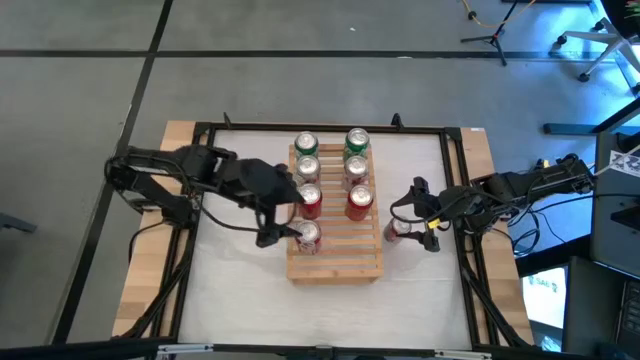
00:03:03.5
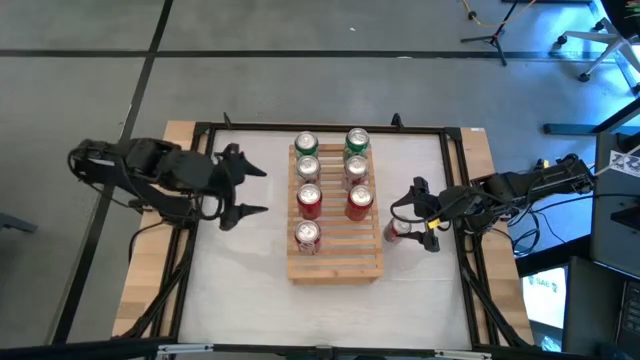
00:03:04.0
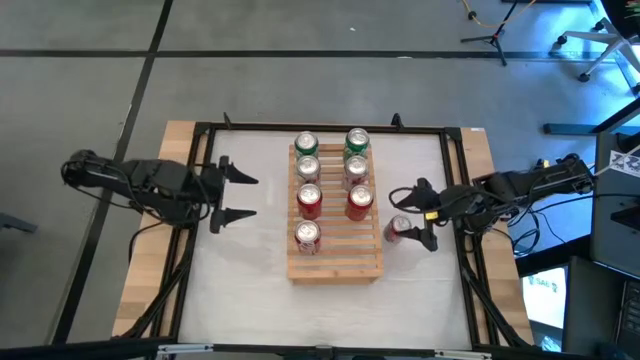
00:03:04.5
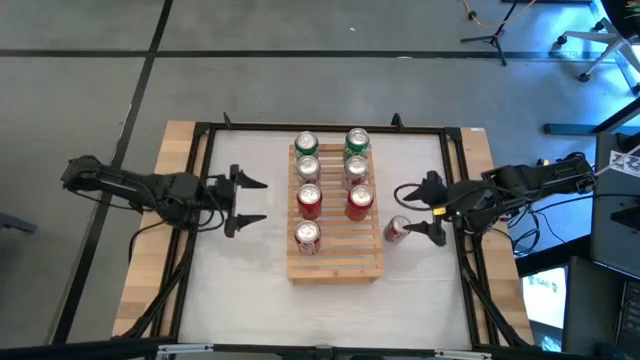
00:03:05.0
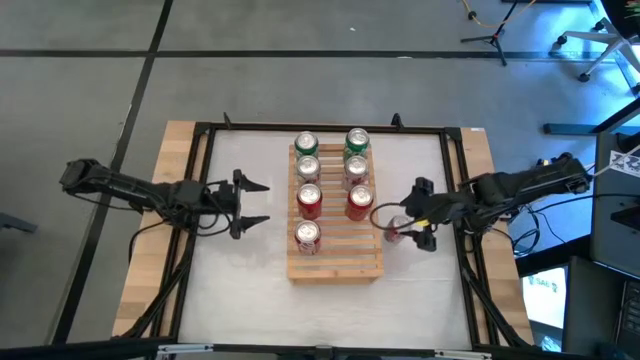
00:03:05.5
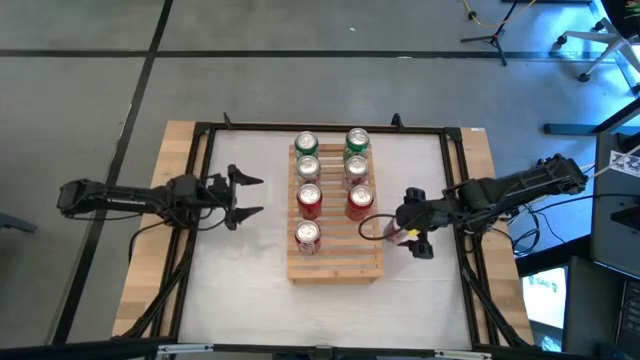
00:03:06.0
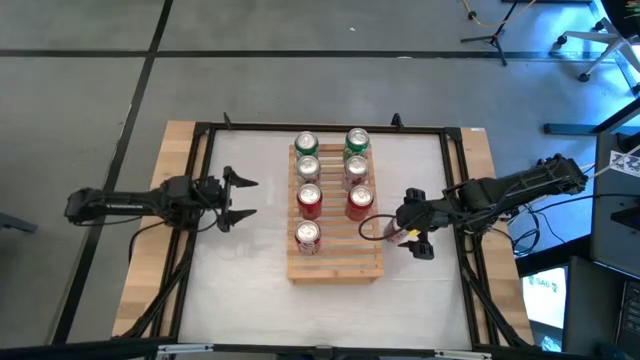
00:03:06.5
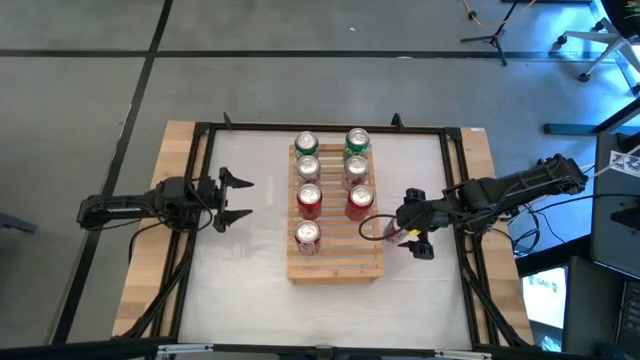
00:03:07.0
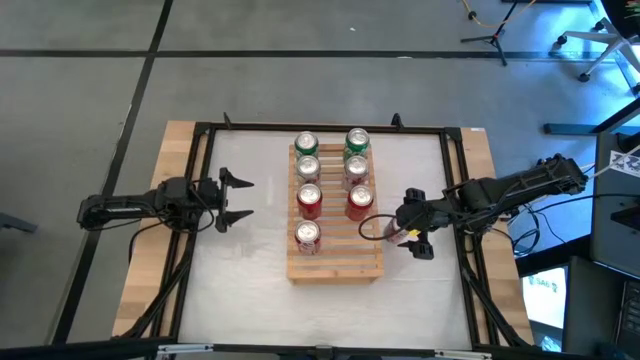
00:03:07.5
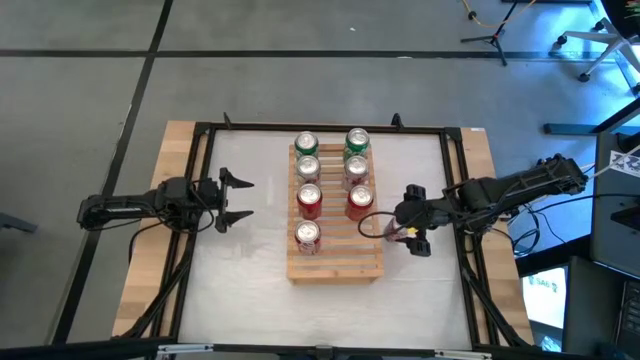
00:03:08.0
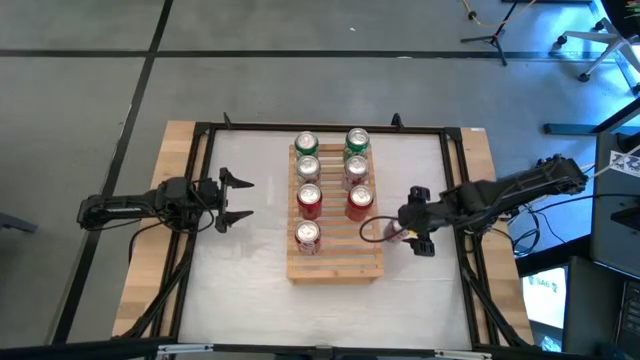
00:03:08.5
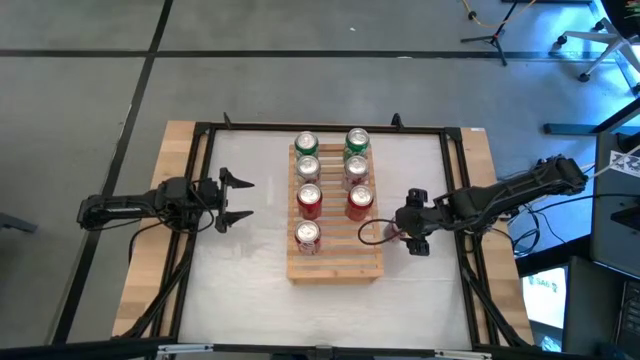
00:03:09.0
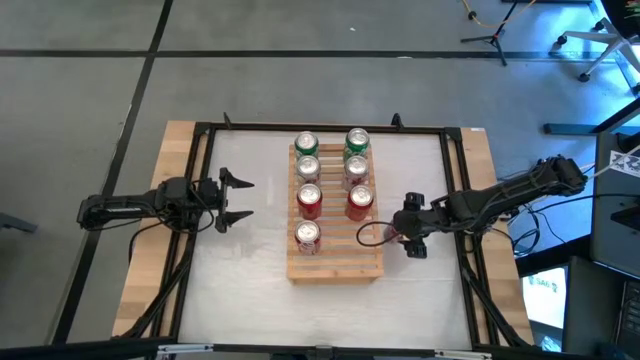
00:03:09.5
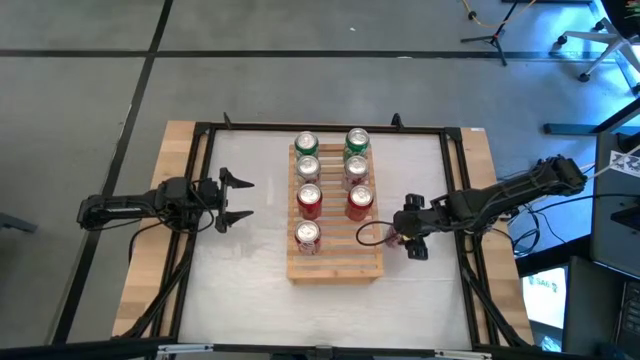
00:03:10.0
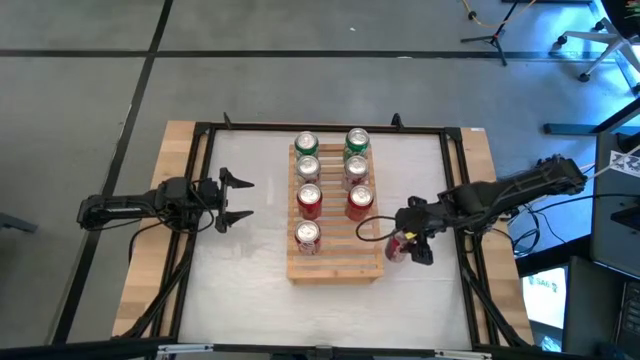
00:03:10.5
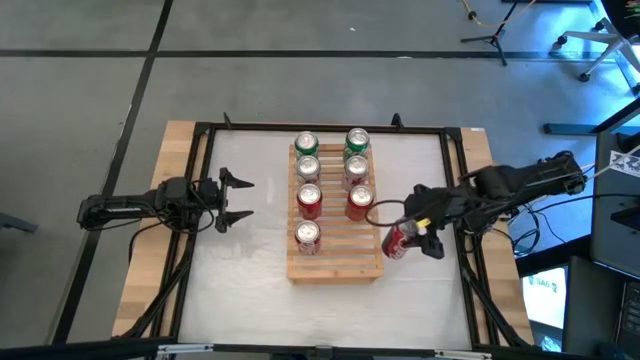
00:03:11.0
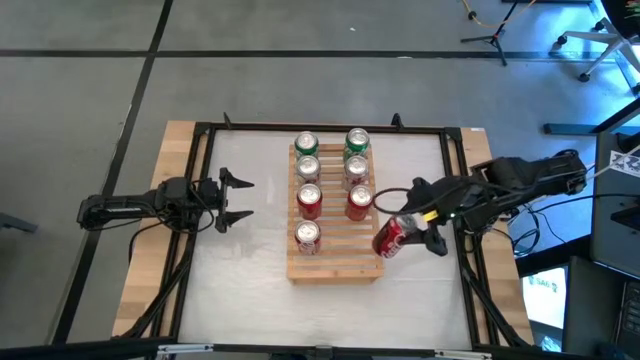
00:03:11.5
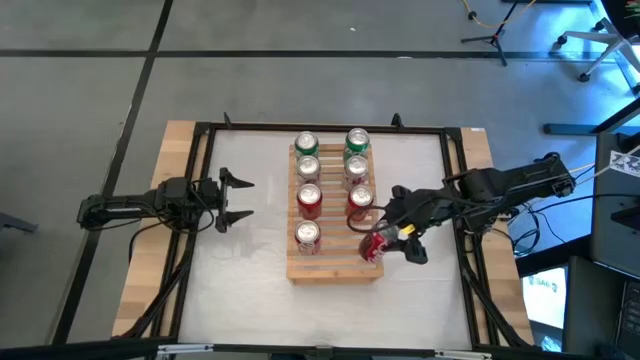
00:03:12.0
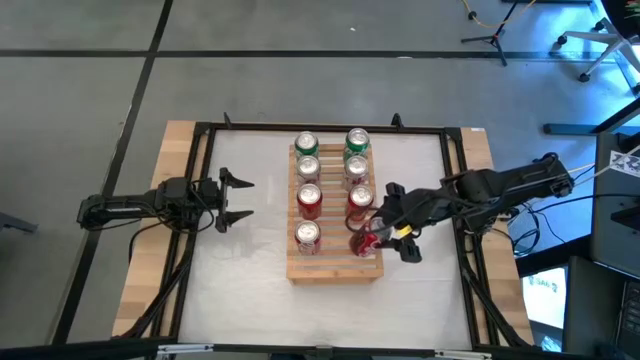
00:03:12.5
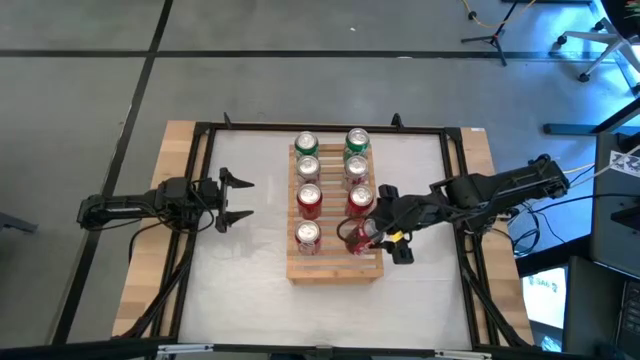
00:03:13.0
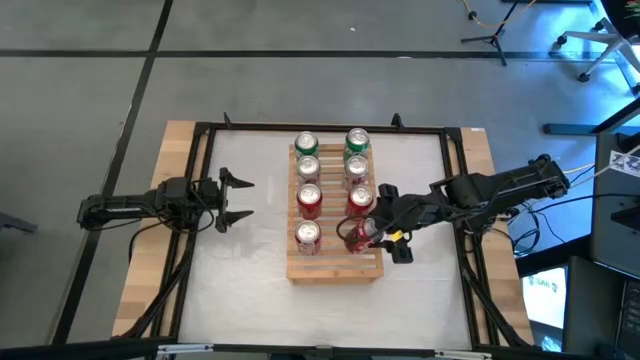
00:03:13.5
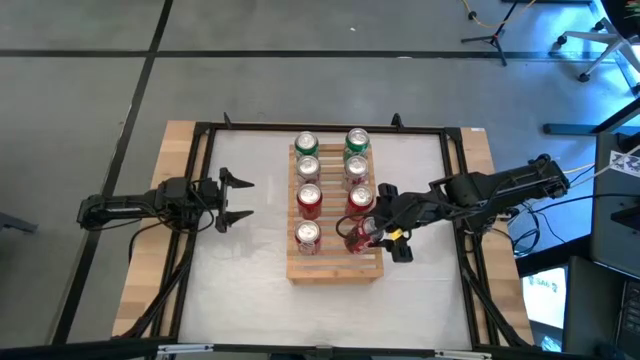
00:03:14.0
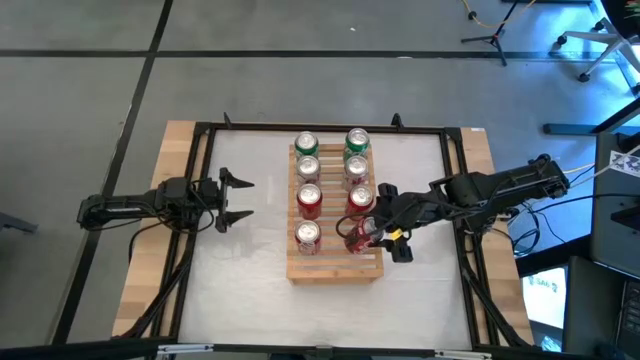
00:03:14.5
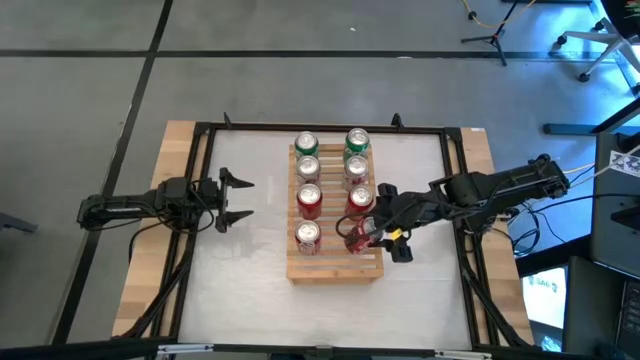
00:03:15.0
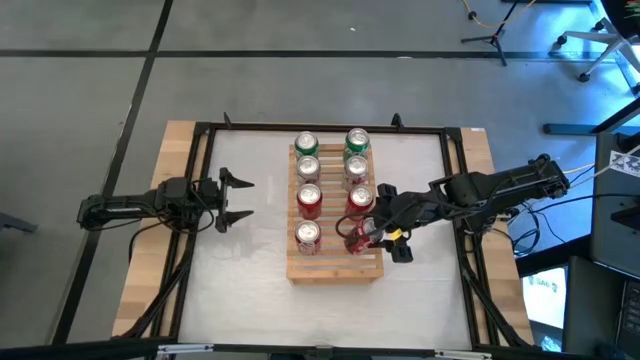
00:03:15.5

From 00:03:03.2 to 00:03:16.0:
Task: Place canned beverage on shelf
Put the white and red soda can on the shelf aligned with the white and red soda can

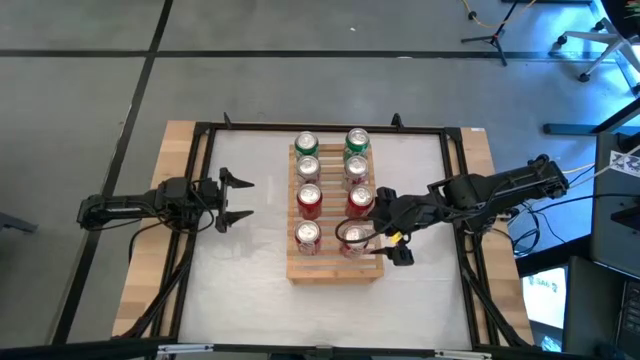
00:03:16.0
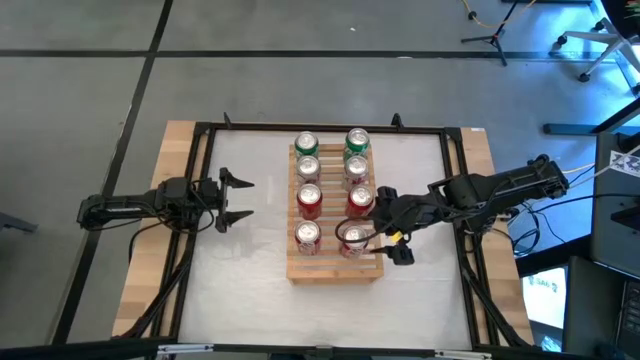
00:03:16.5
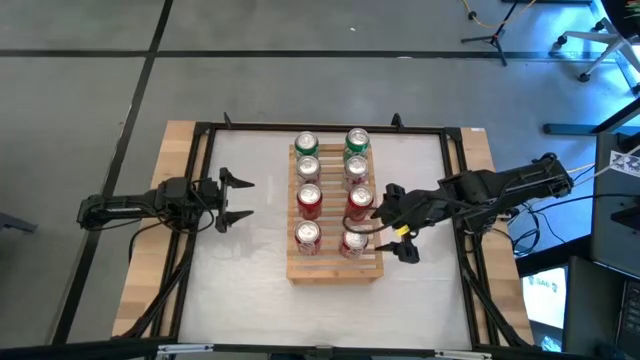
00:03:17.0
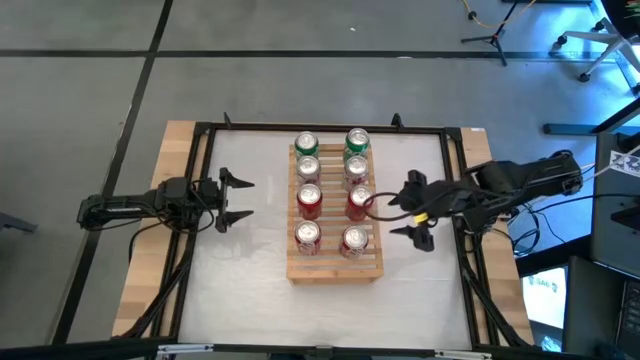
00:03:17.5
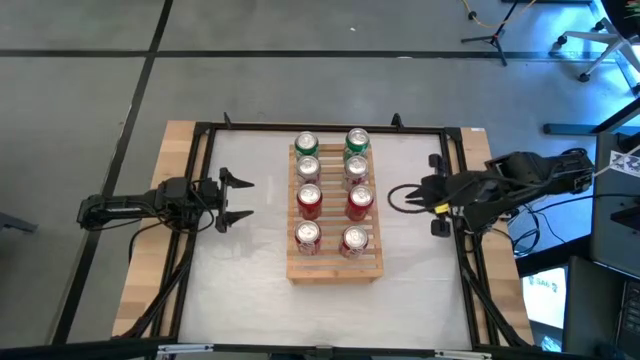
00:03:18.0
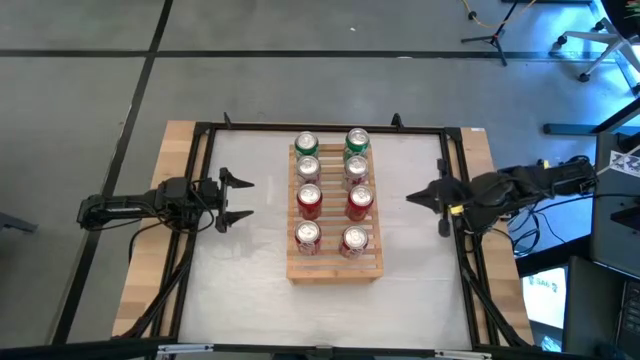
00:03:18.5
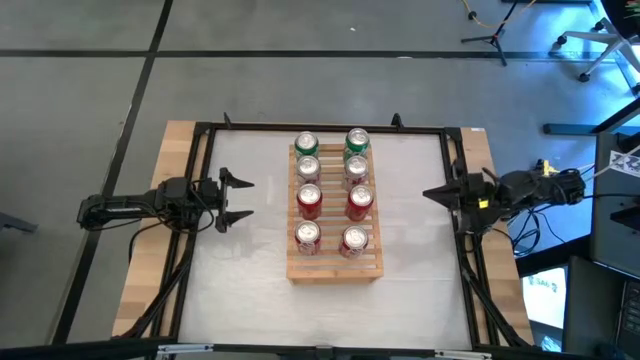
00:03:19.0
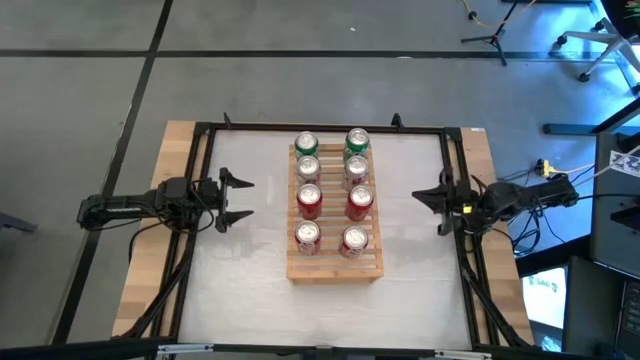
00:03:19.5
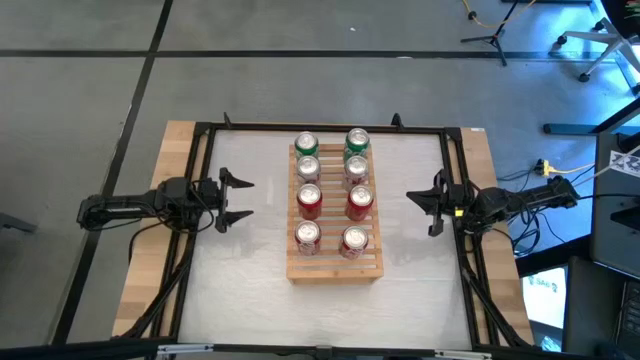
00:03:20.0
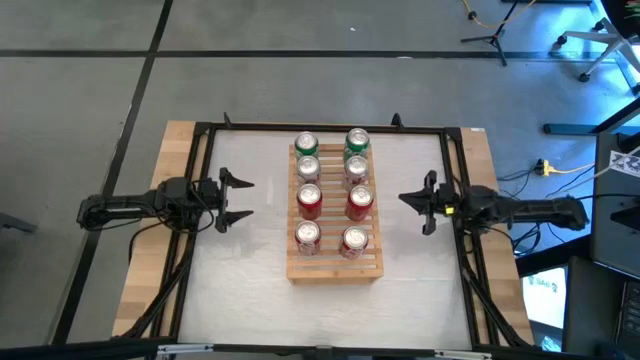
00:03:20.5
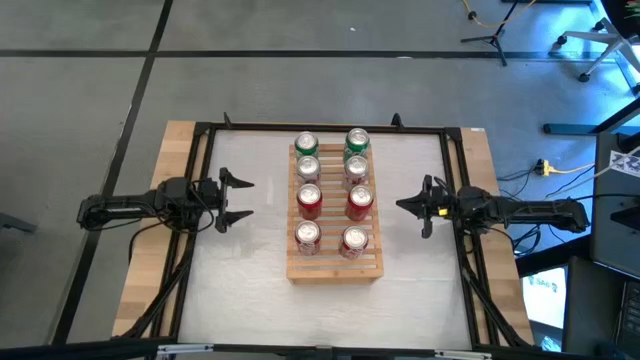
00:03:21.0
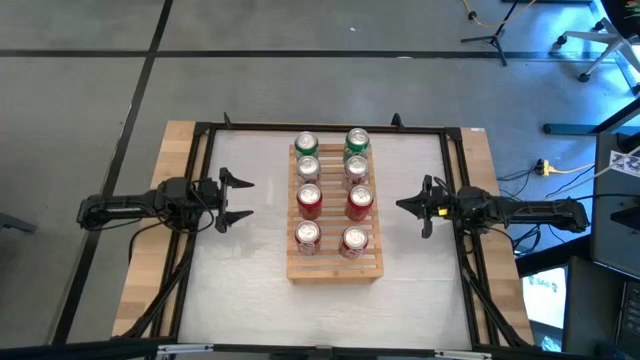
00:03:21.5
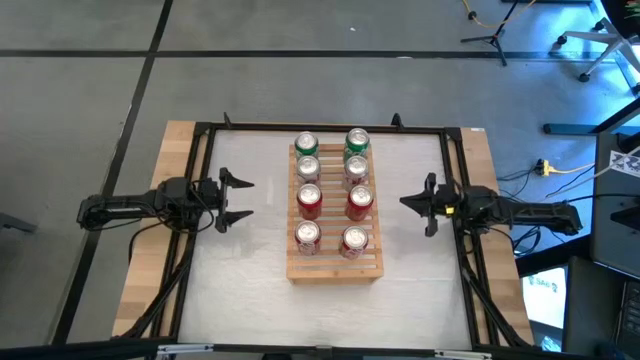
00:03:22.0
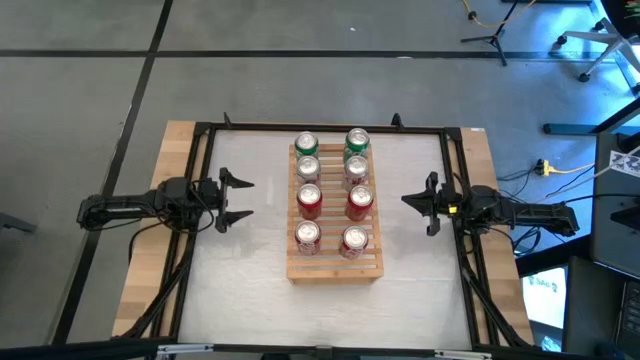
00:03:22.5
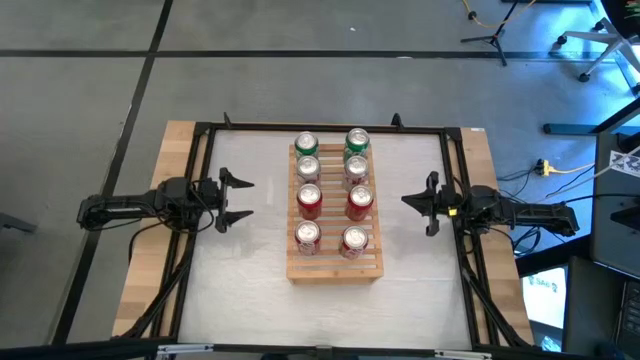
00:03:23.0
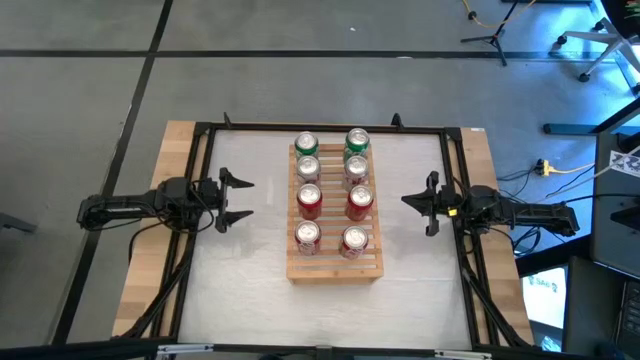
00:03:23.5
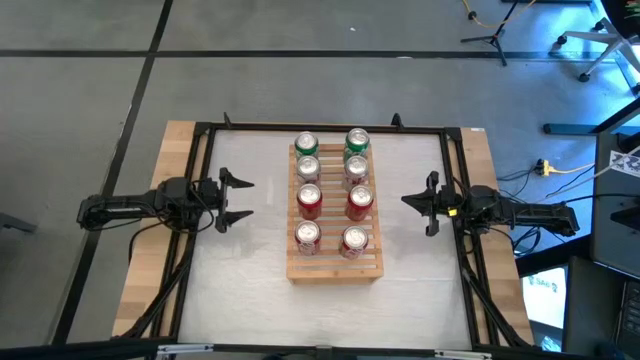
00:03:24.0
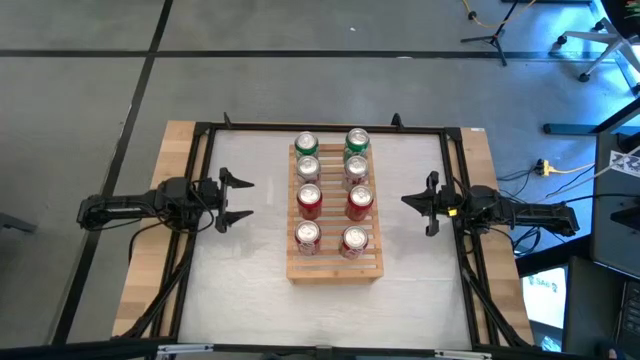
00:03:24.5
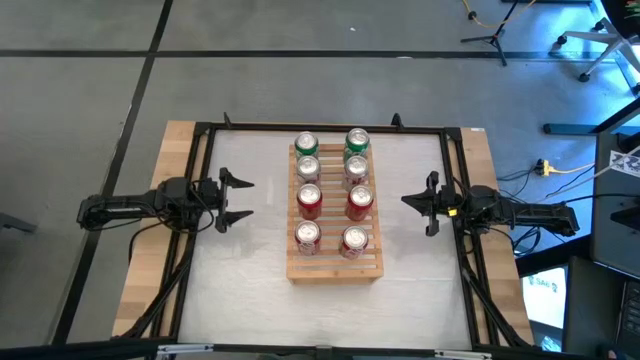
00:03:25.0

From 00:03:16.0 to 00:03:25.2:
Return to Home Position
